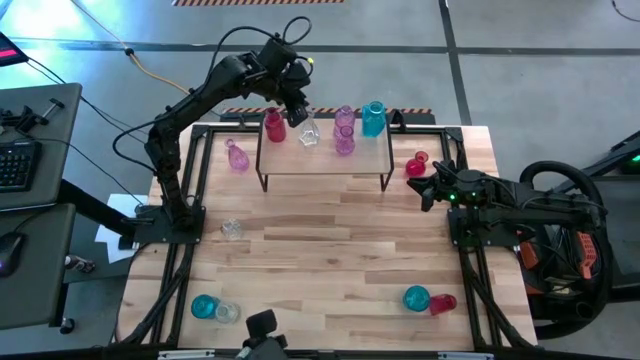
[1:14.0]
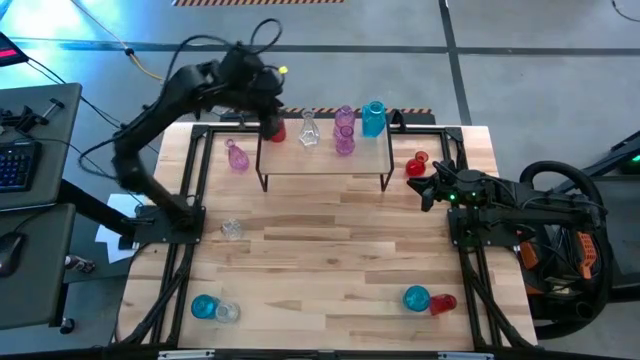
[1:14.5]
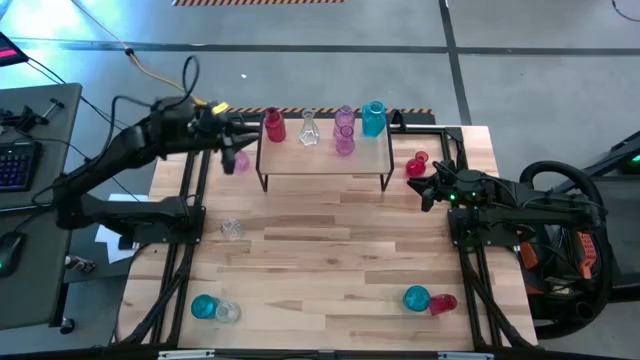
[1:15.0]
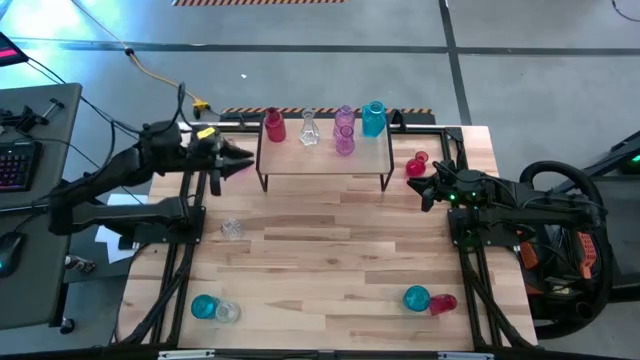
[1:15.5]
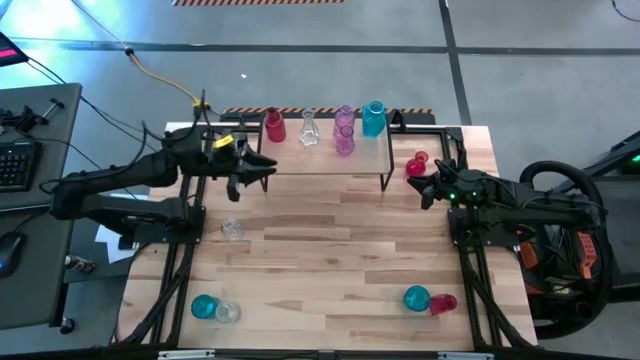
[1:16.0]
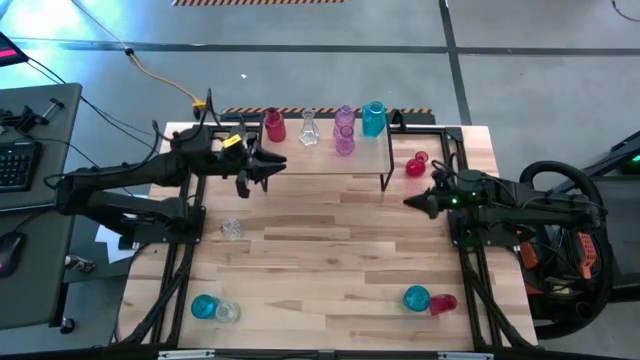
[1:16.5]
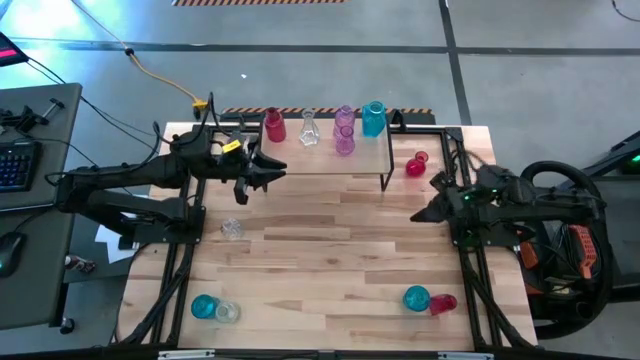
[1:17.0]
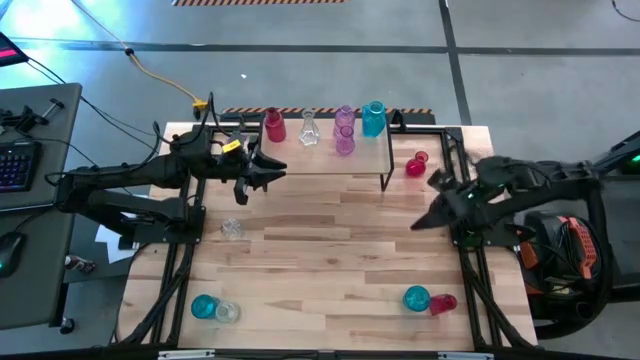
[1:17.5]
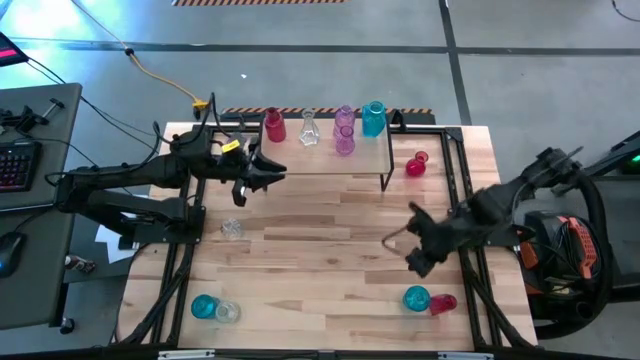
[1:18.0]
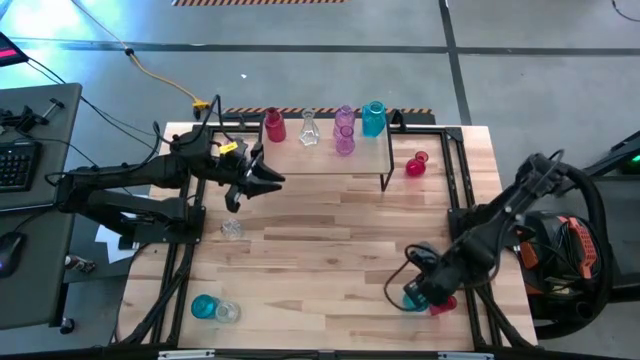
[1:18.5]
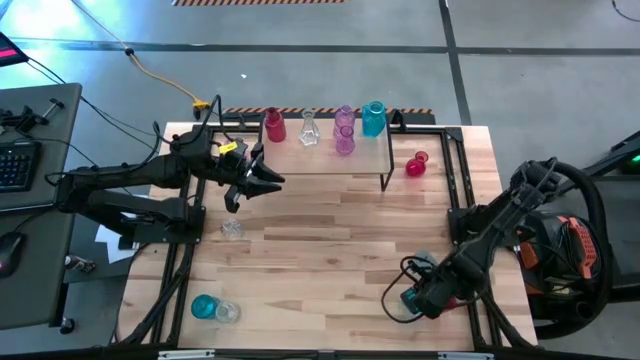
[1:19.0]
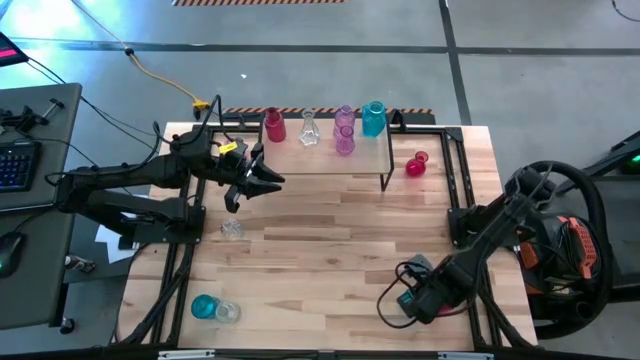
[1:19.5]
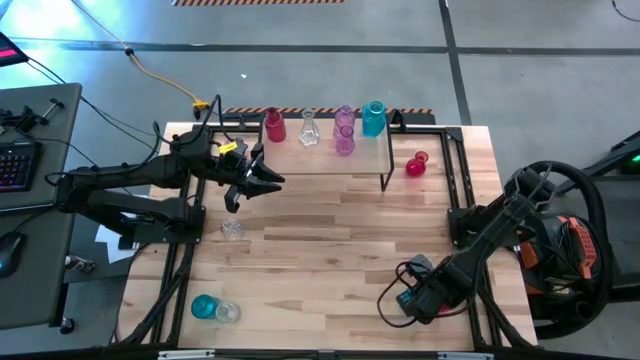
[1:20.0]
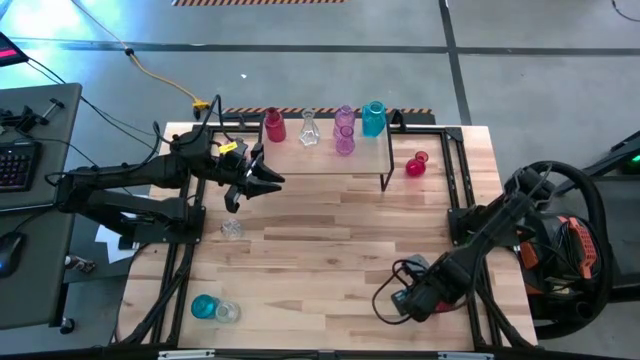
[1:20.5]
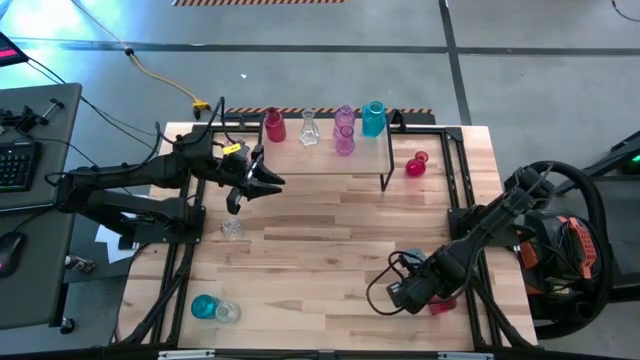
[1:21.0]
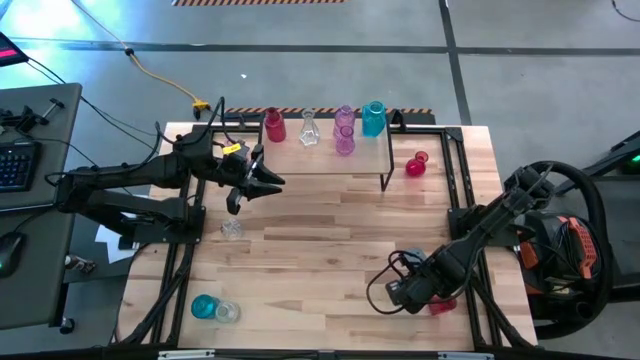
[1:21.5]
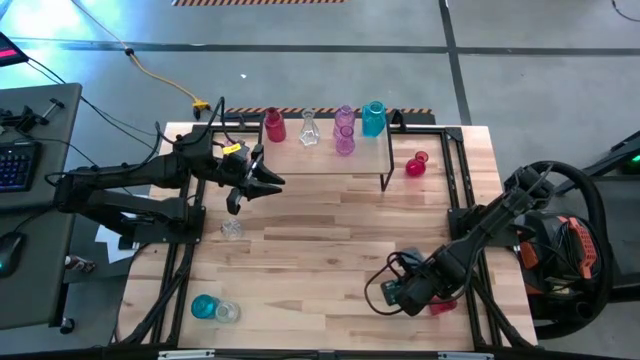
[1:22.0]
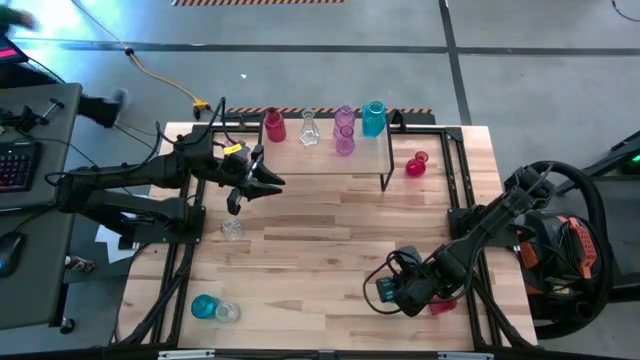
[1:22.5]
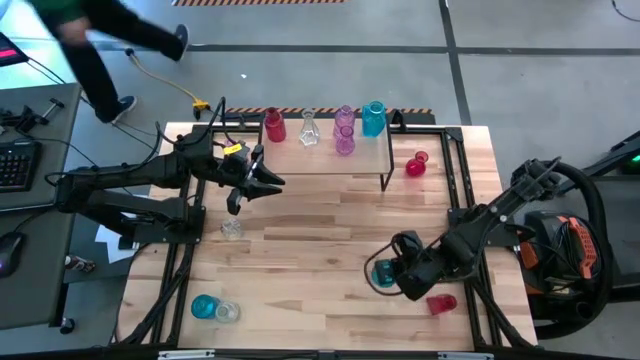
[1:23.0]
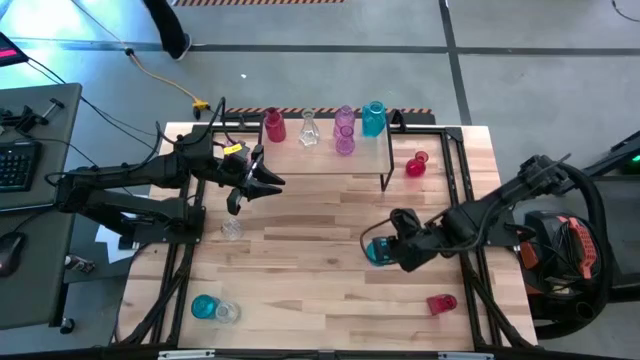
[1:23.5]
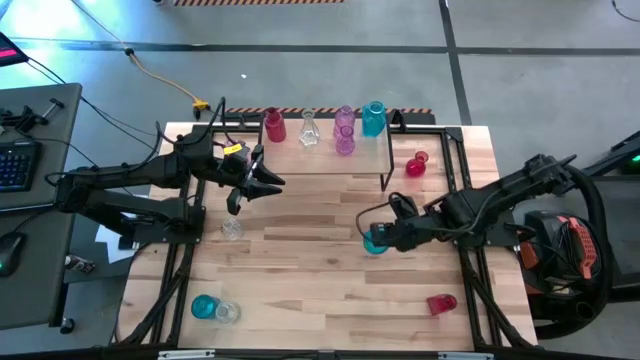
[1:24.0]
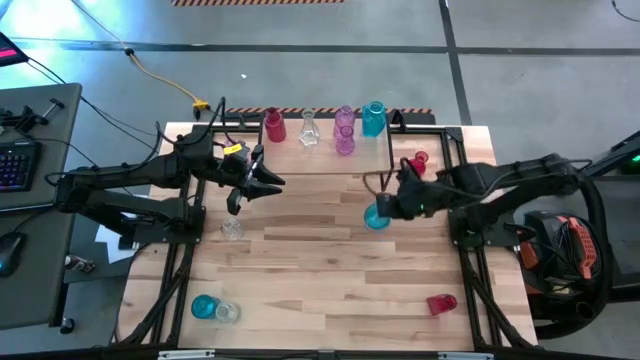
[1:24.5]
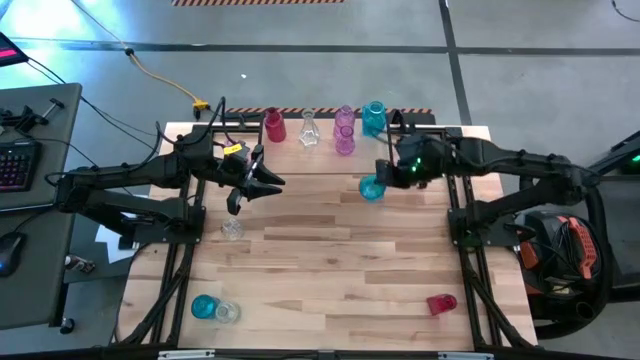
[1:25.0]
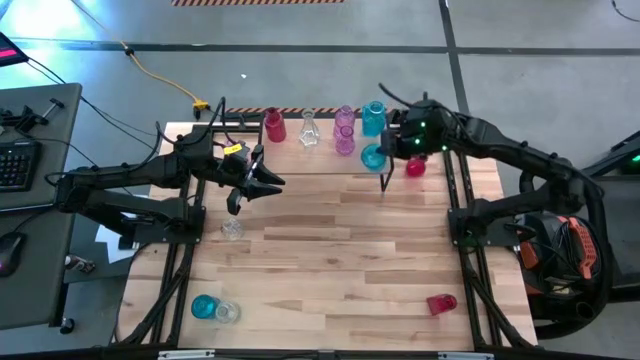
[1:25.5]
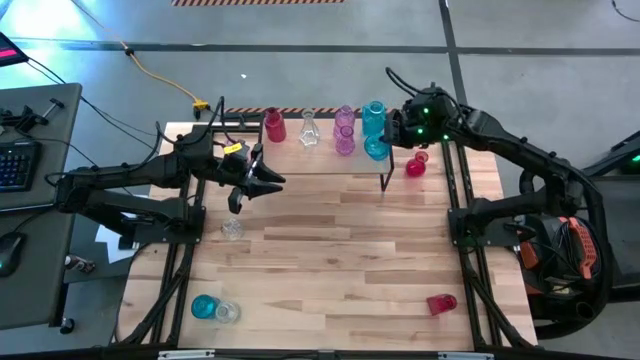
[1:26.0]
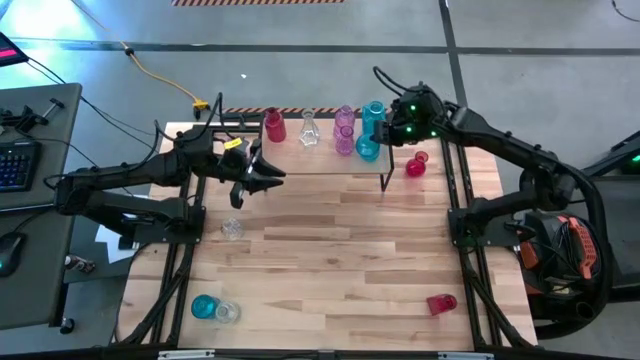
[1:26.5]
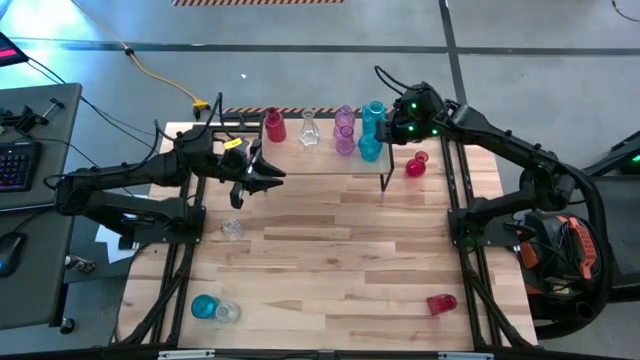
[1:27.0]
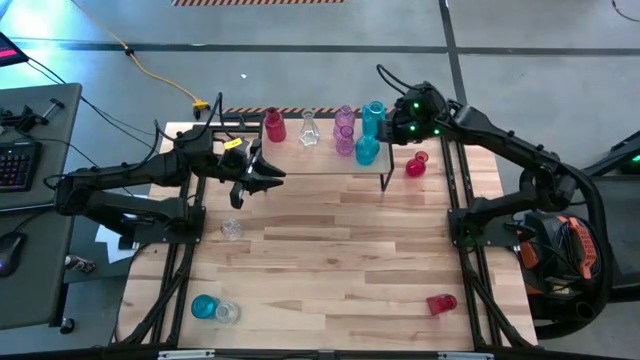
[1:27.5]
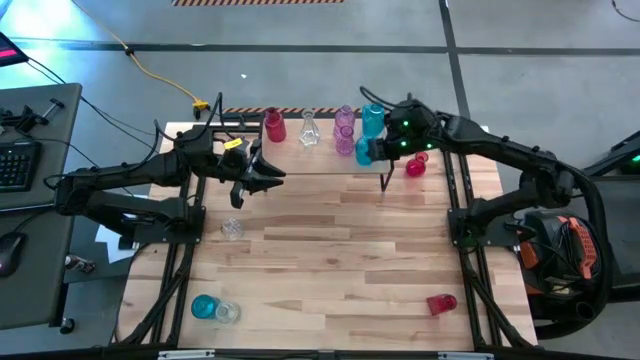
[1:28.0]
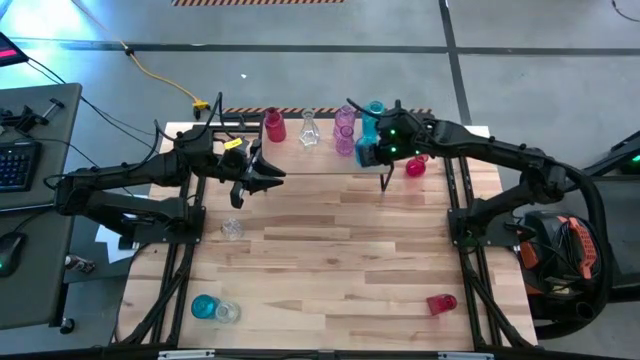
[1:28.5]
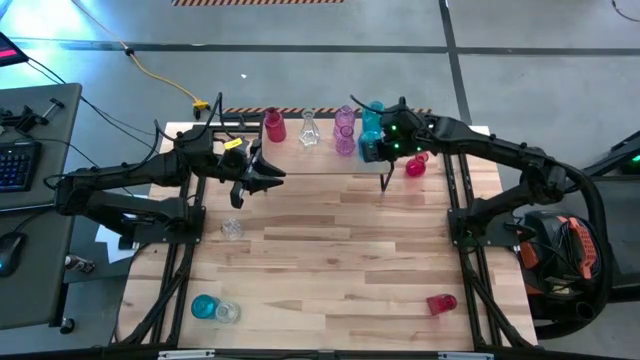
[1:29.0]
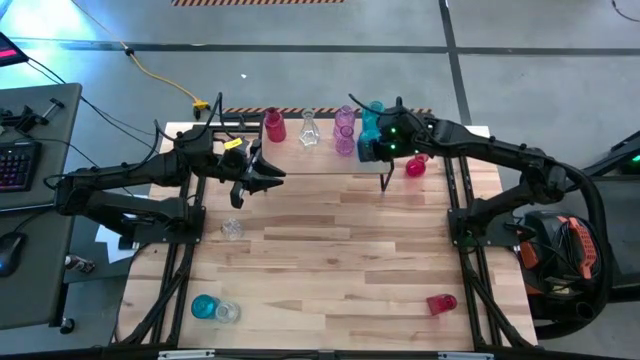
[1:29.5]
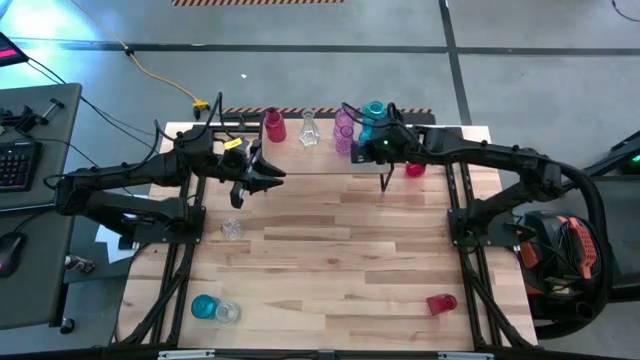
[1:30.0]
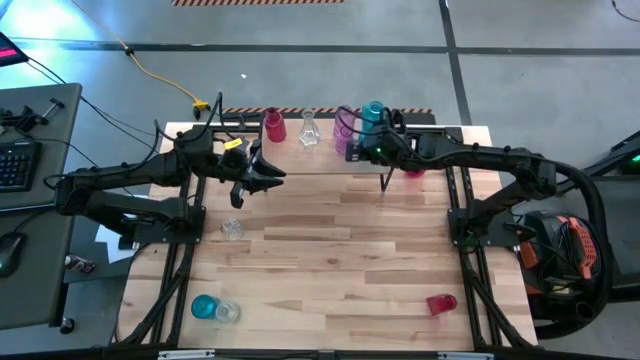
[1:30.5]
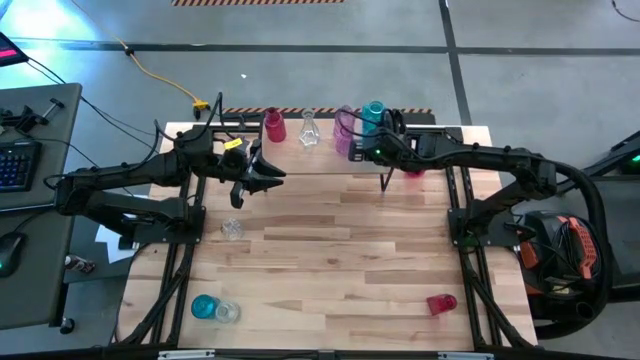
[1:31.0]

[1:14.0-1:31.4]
Task: sort vases onto shelf
Put the right blue vase on the shelf aligned with the other blue vase

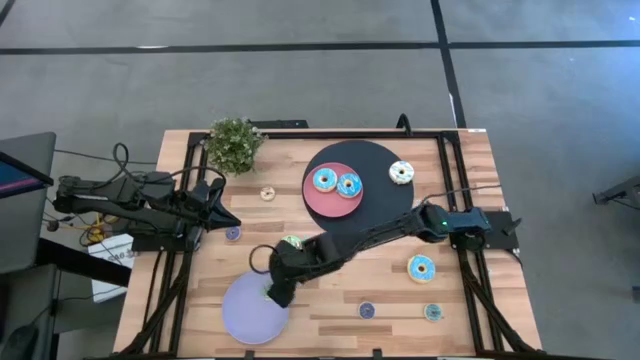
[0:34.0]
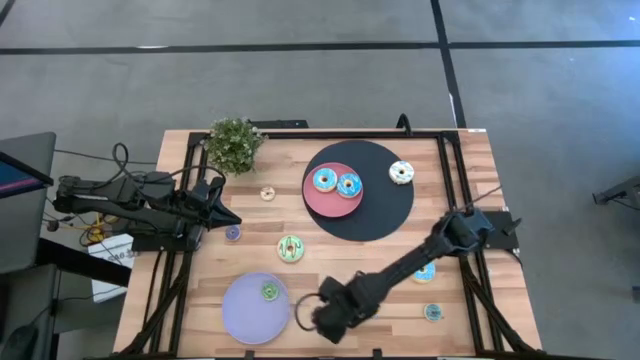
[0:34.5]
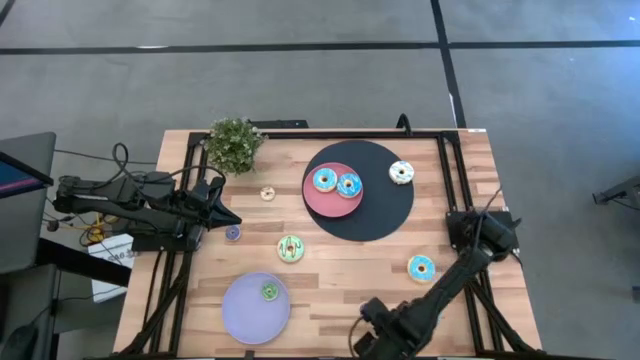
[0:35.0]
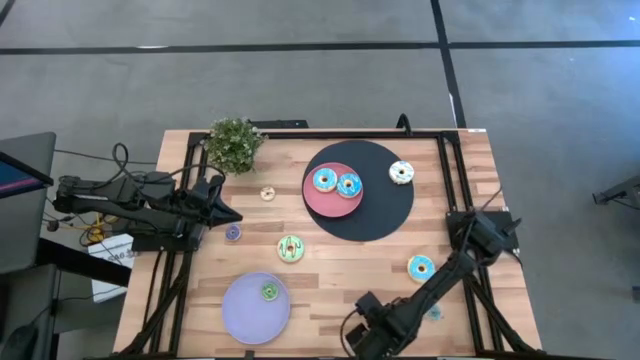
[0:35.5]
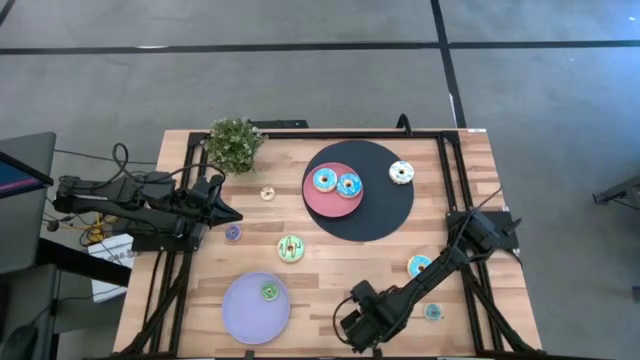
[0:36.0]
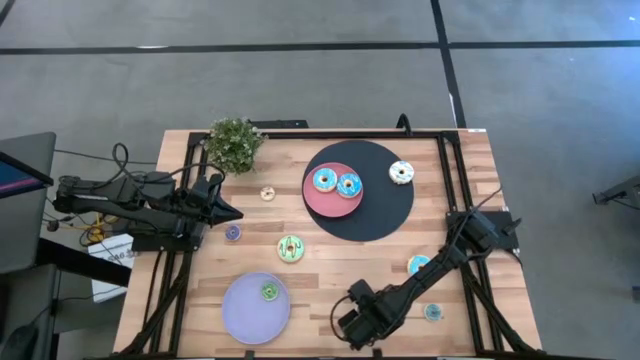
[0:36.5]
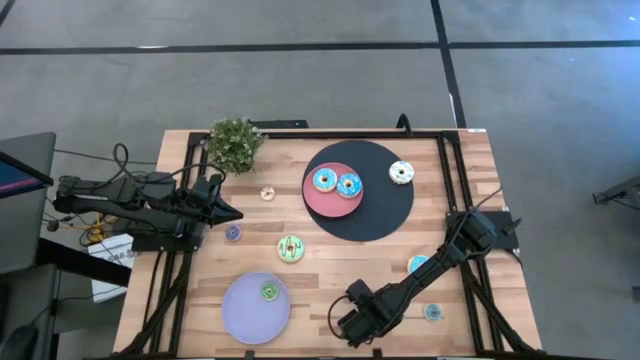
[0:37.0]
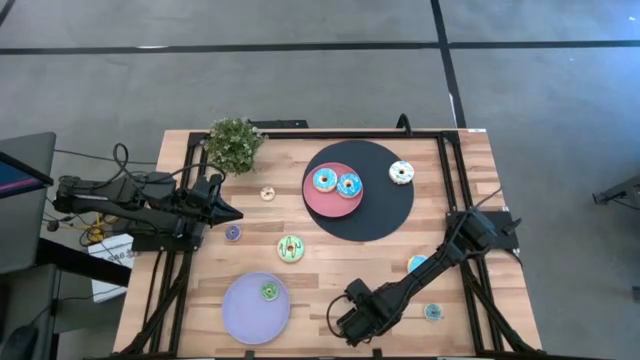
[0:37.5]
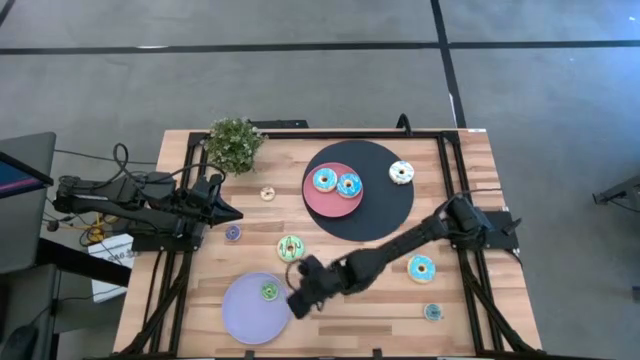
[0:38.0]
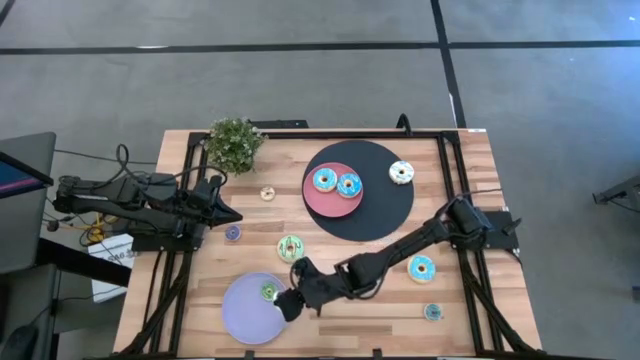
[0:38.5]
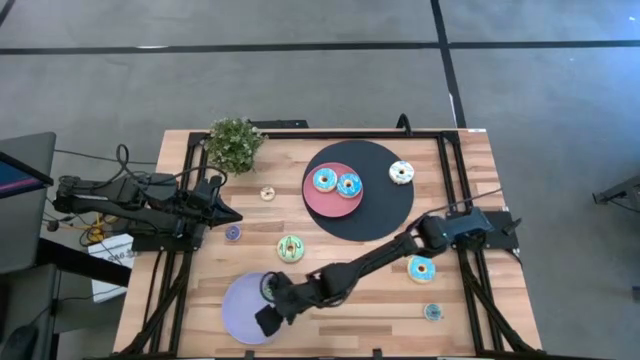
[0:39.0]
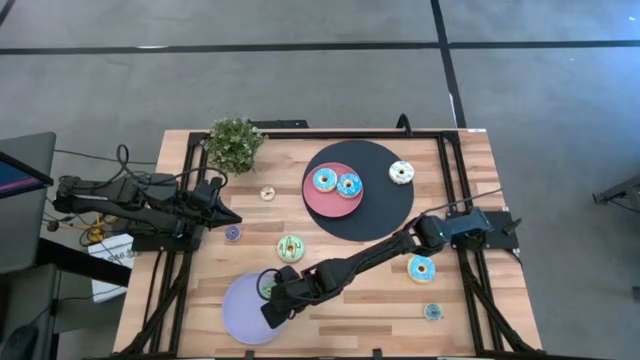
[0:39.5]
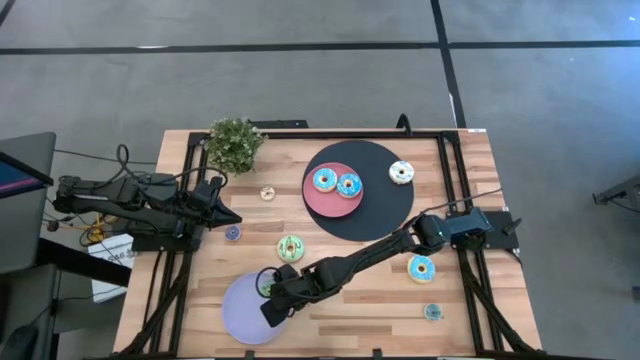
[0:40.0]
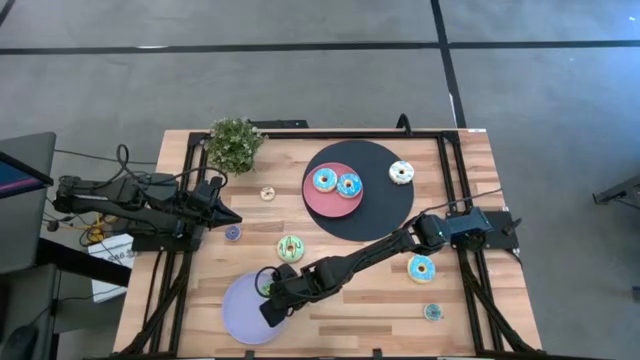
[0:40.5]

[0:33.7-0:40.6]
Task: Pick & Place donuts
Put the small dark blue donut on the purple plate
